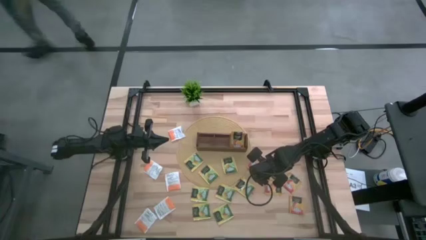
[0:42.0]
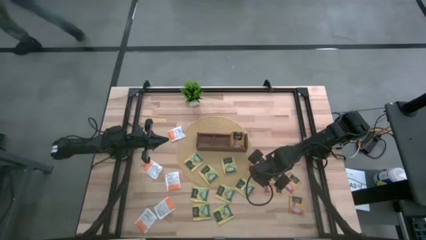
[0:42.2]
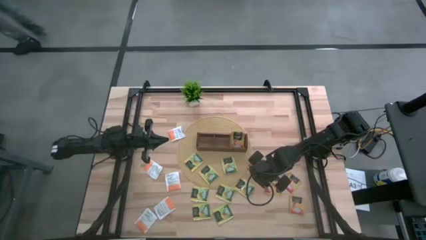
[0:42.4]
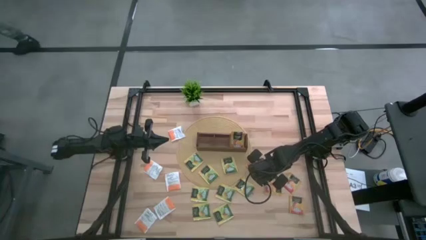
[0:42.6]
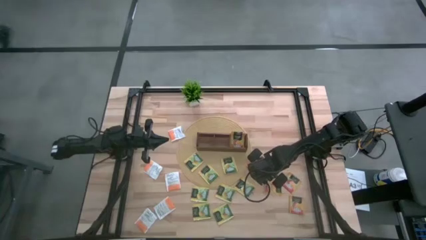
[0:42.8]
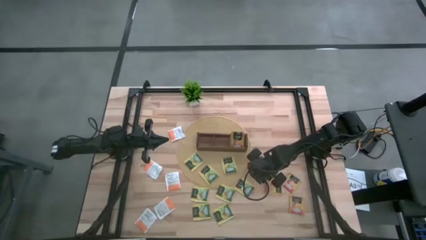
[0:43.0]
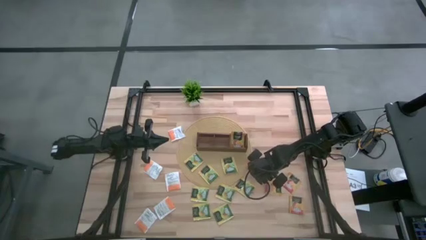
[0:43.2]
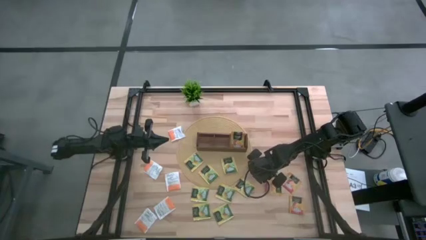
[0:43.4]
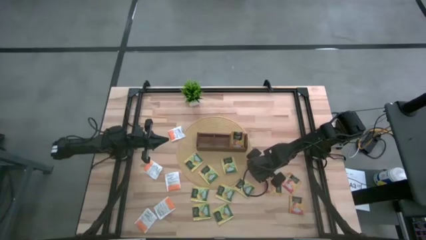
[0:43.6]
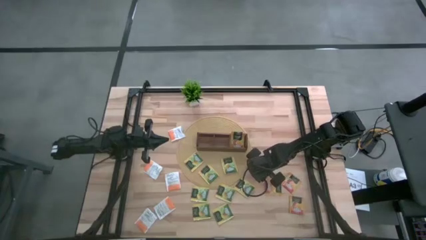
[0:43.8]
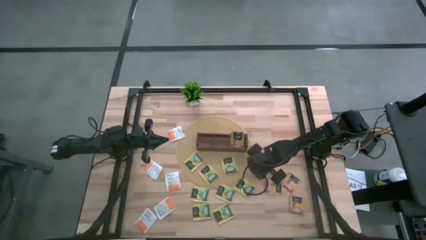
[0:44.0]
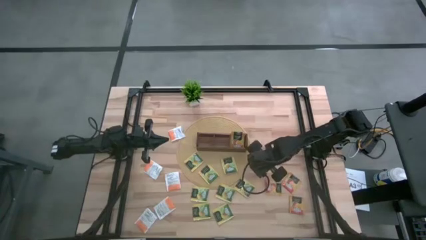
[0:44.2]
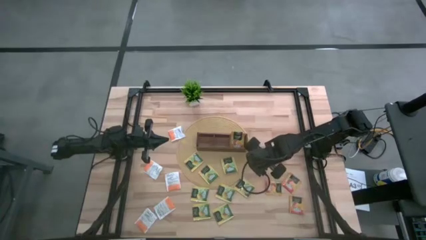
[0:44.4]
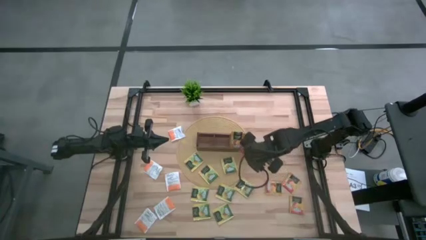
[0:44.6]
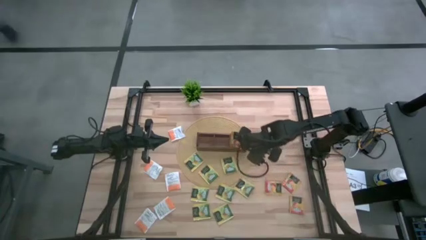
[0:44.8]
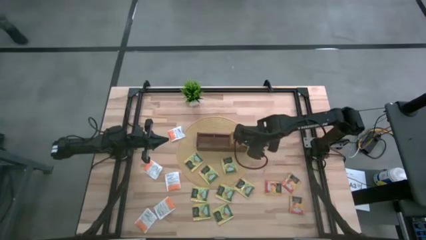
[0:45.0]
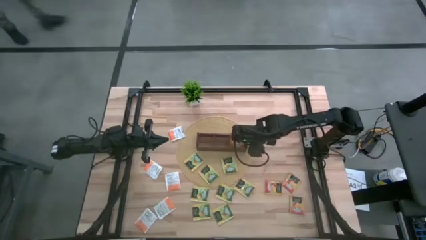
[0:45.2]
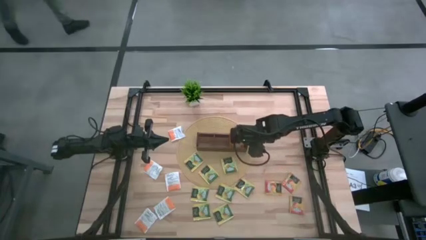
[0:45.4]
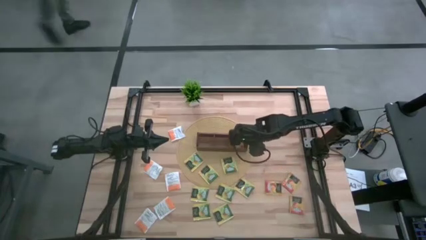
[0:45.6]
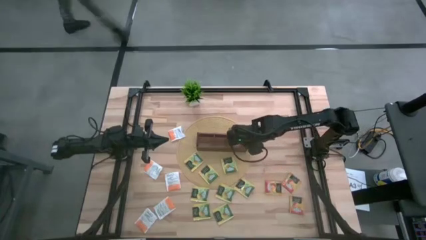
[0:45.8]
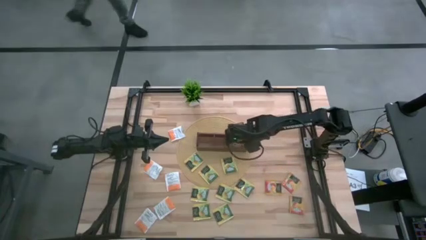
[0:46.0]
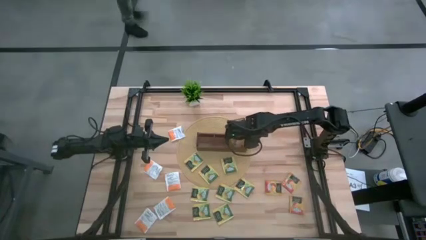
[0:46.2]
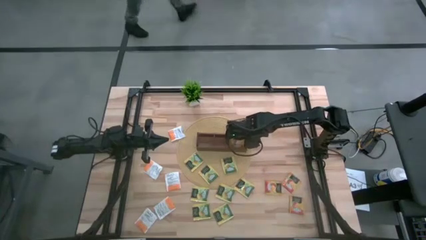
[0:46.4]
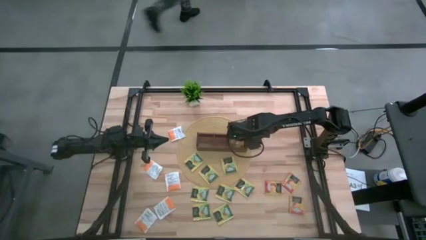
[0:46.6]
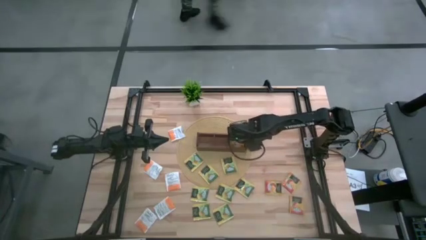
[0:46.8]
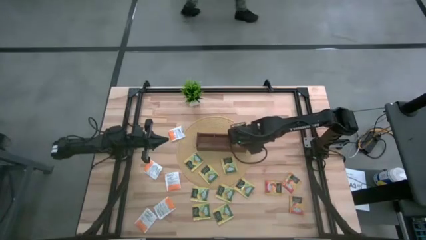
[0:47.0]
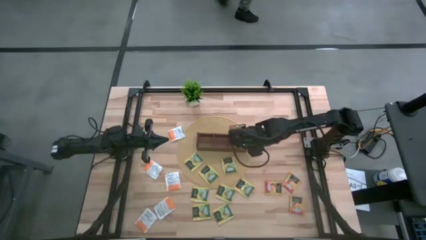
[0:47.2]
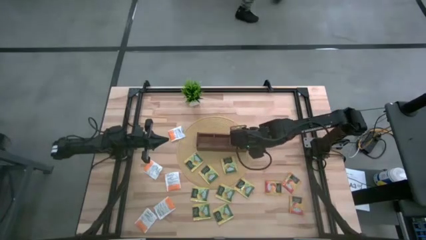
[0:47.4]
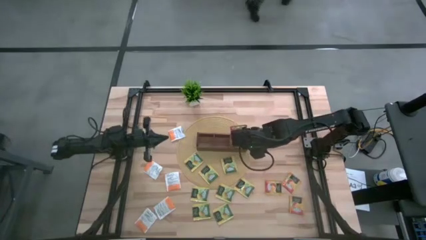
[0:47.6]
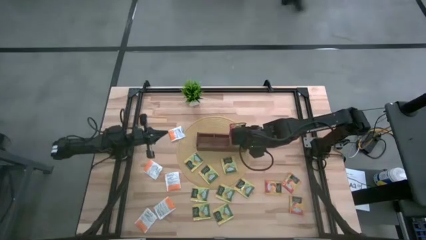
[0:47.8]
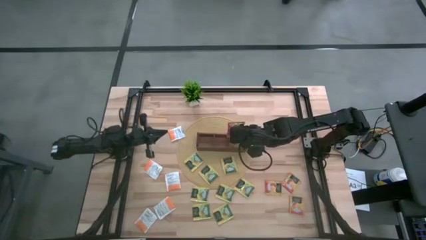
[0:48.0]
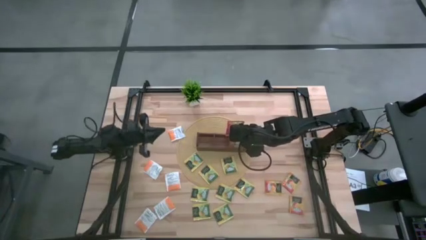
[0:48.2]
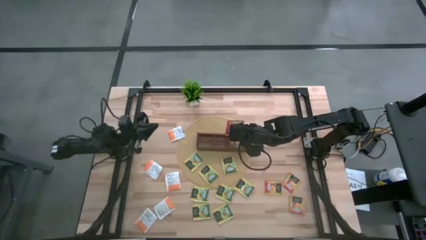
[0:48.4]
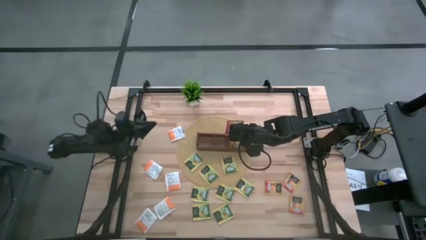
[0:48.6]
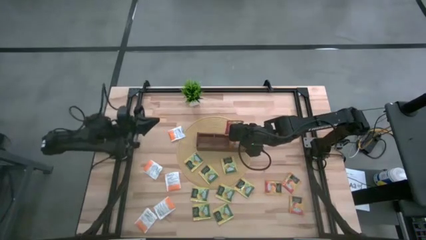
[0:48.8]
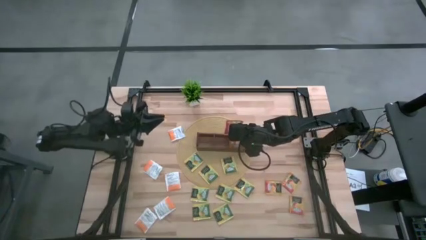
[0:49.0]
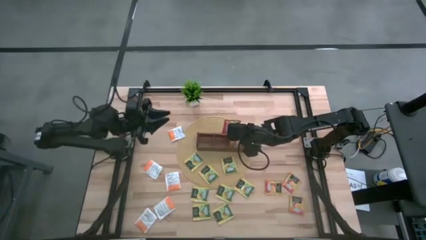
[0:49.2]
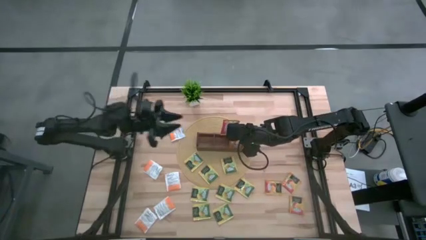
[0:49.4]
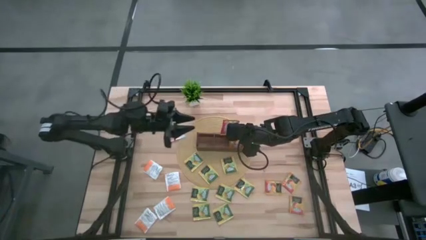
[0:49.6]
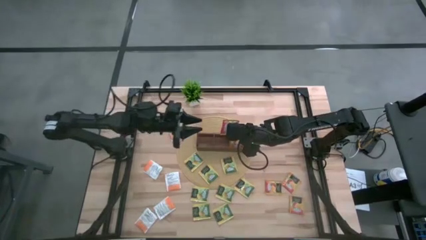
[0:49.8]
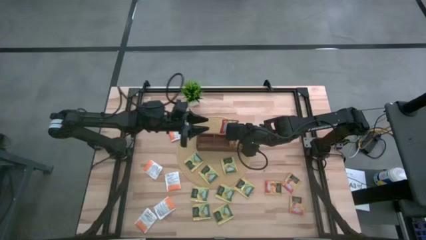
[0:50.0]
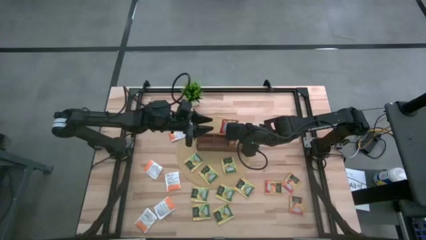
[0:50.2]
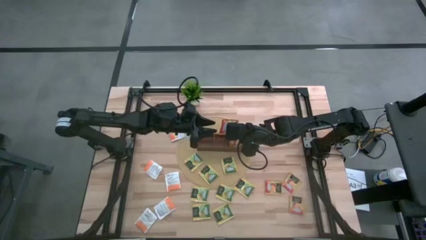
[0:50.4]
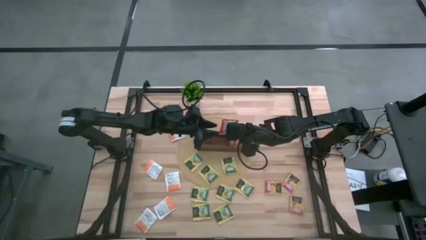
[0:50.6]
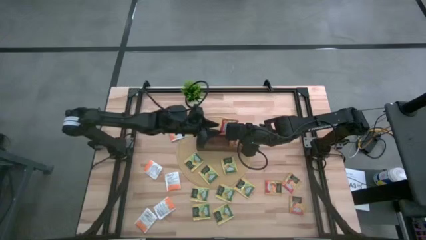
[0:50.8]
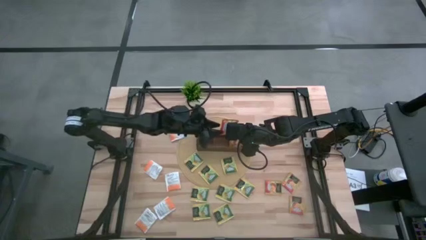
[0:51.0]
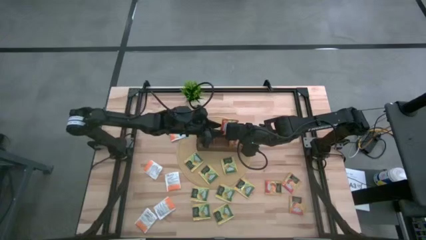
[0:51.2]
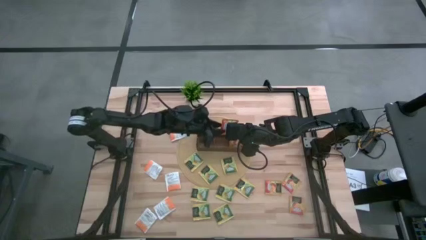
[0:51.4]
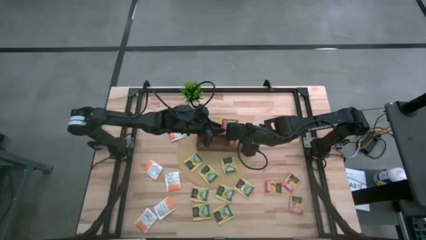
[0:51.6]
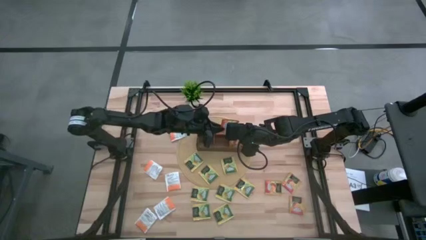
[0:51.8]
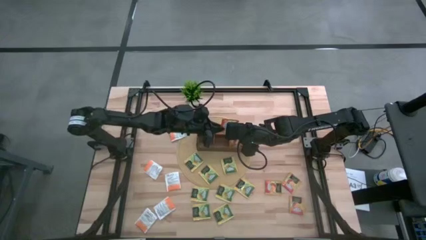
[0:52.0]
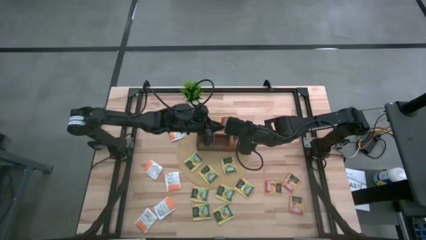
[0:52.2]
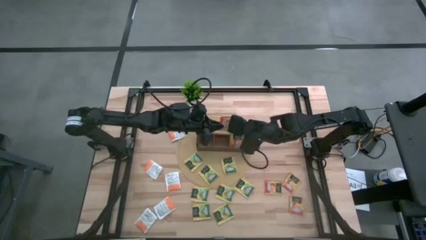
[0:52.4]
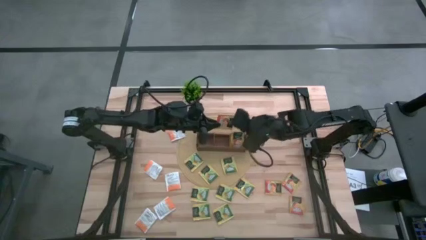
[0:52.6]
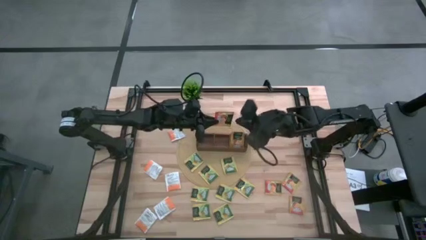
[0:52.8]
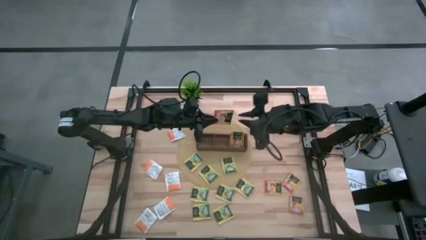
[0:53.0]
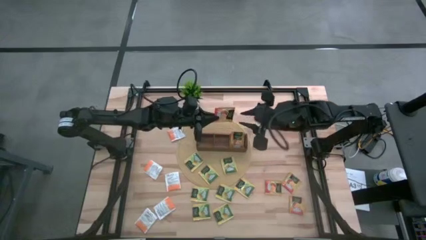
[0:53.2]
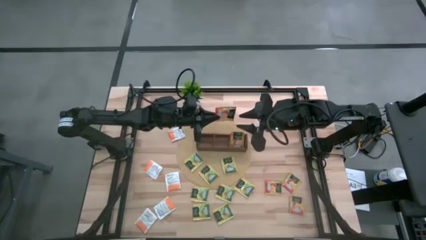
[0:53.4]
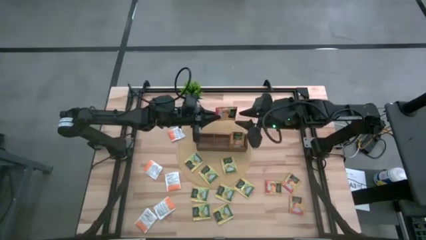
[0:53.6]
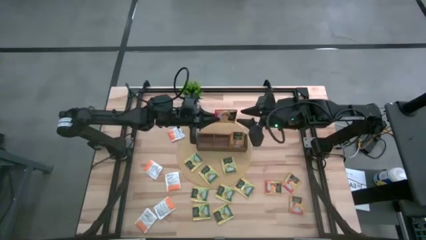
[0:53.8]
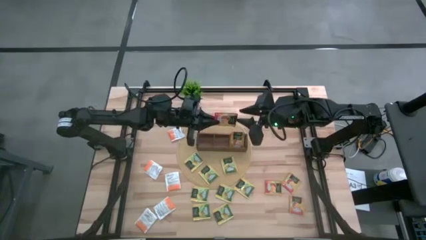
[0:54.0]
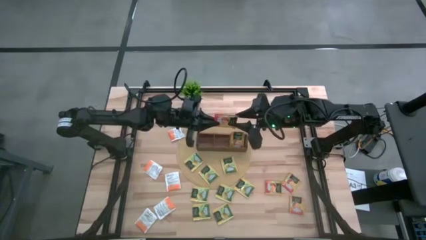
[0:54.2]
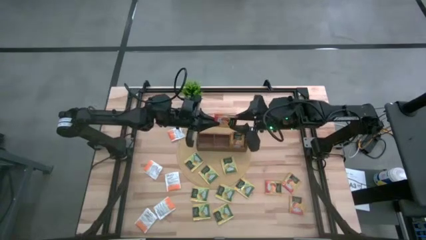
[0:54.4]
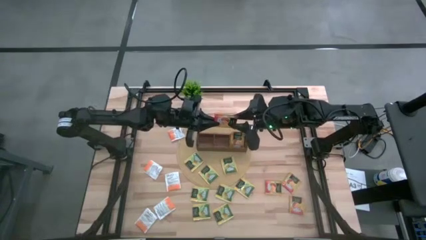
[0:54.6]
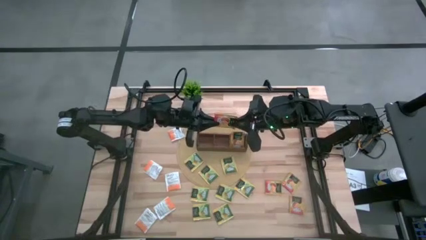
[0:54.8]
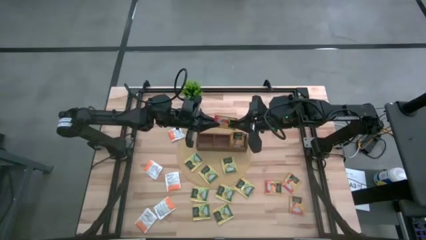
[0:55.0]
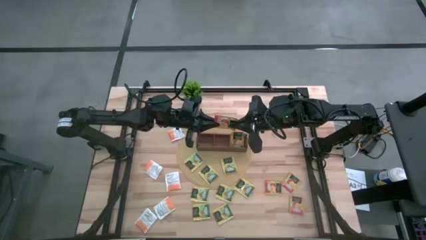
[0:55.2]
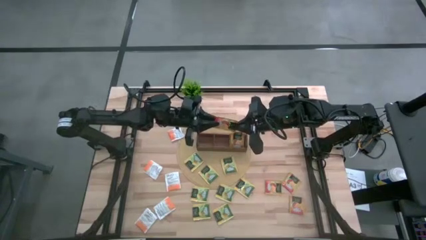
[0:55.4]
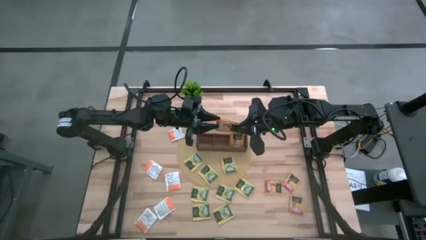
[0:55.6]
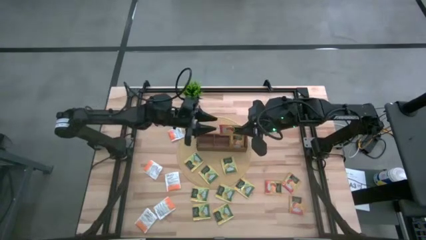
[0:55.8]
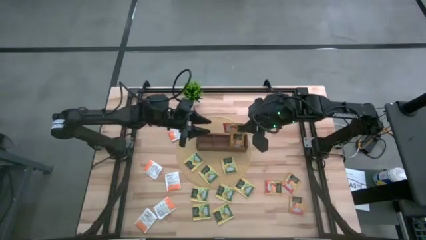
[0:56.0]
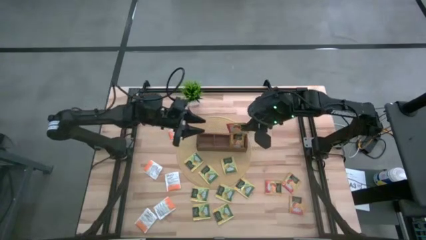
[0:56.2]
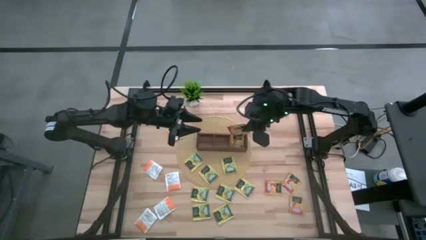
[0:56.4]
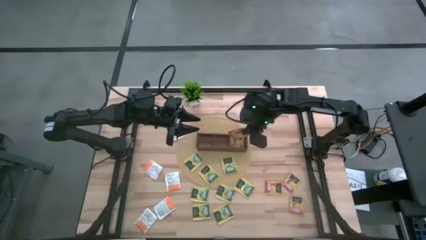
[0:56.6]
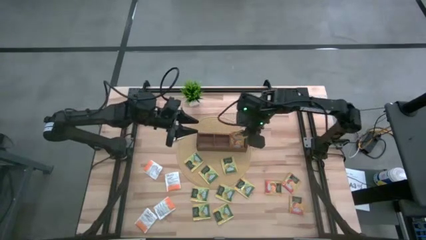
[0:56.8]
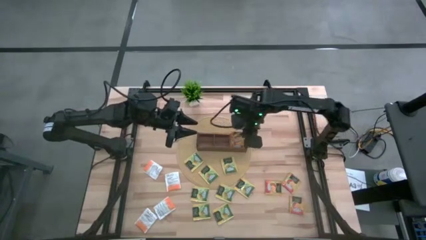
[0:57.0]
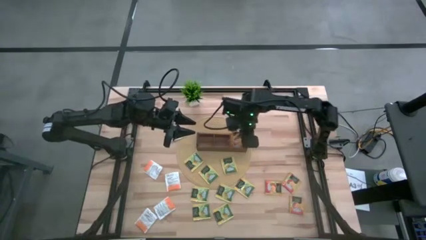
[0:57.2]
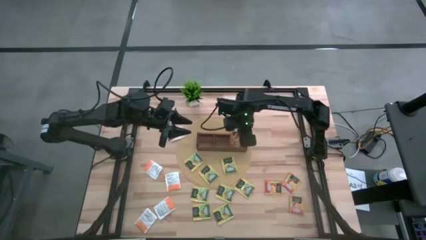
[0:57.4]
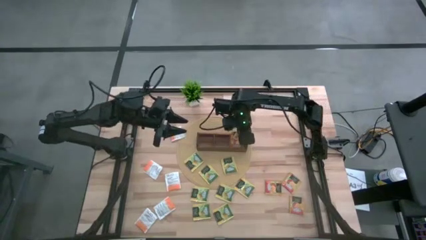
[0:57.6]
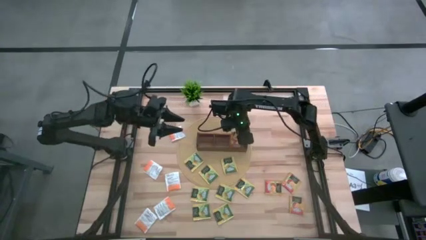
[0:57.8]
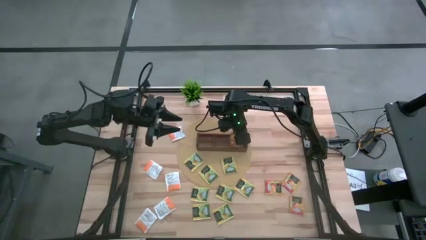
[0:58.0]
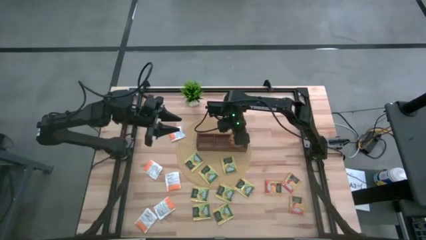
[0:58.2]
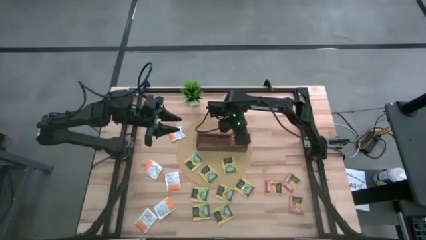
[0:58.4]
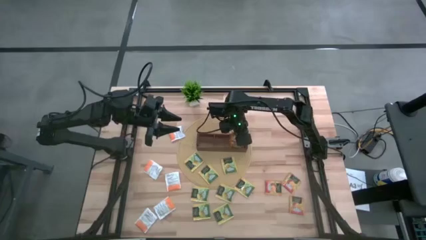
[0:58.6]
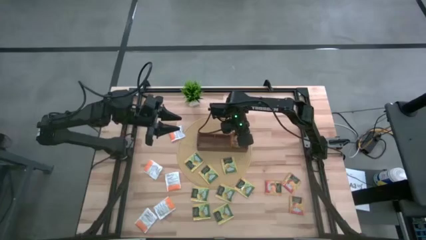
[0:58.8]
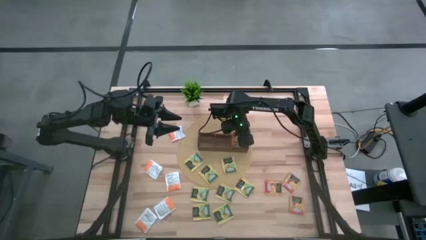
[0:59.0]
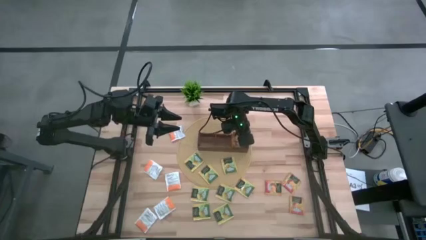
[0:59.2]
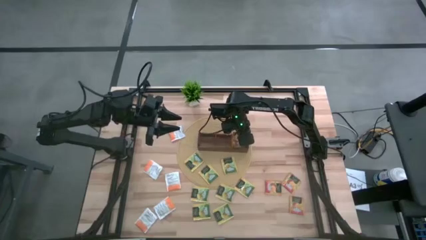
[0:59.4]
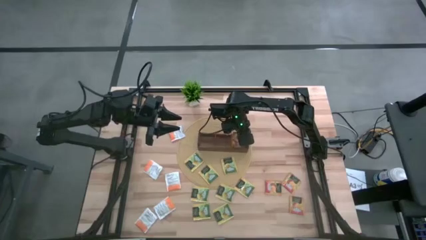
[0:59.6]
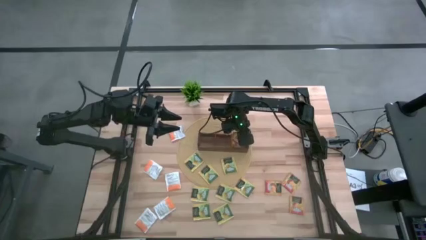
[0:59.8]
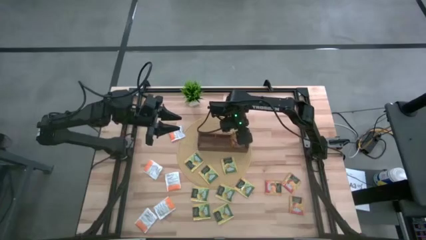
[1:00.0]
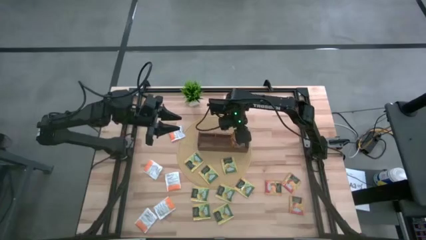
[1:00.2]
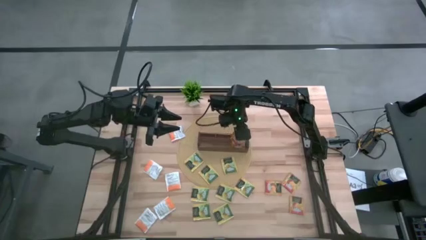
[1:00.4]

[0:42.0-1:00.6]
Task: Pick & Place Tea
Put the orange tea bag into the right section of the wooden organizer
